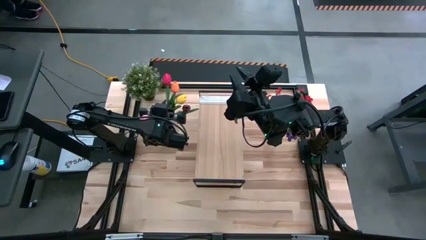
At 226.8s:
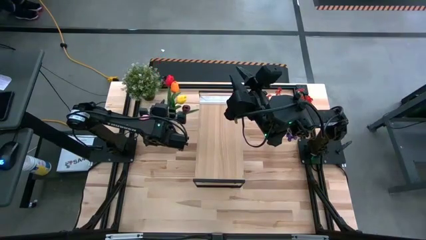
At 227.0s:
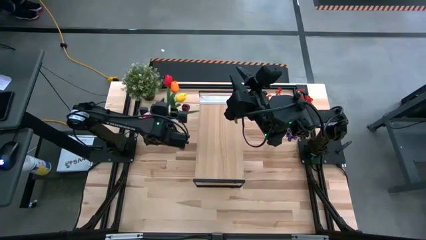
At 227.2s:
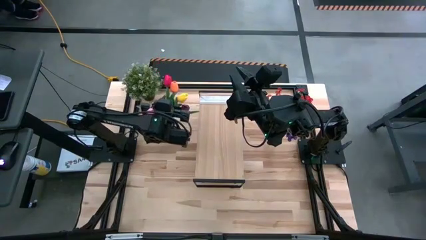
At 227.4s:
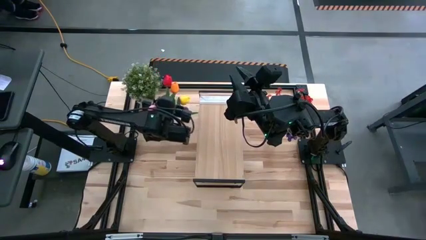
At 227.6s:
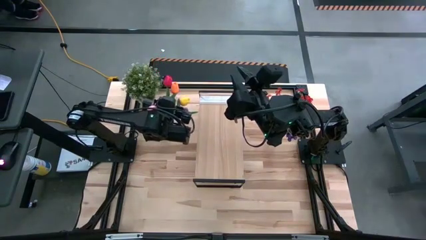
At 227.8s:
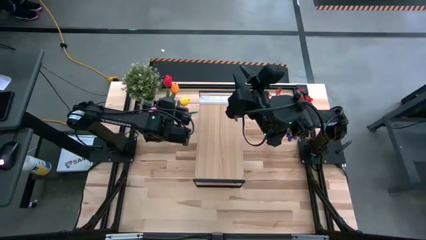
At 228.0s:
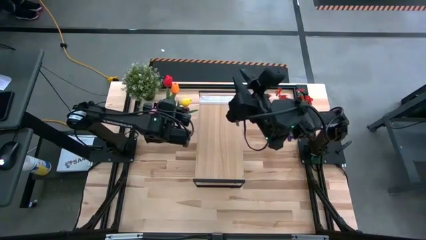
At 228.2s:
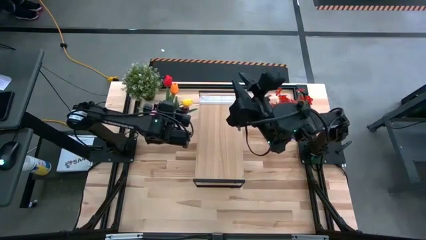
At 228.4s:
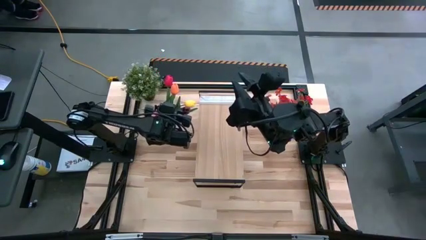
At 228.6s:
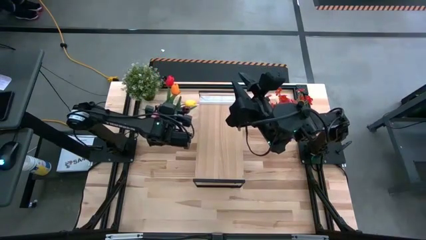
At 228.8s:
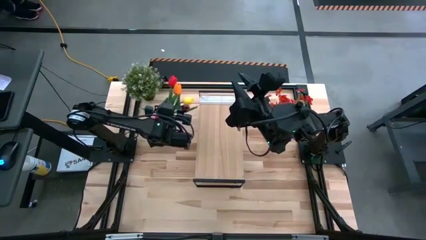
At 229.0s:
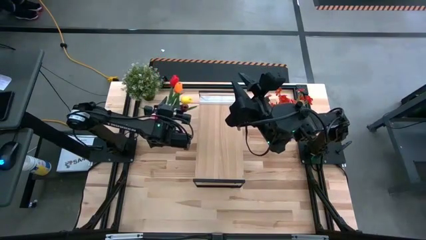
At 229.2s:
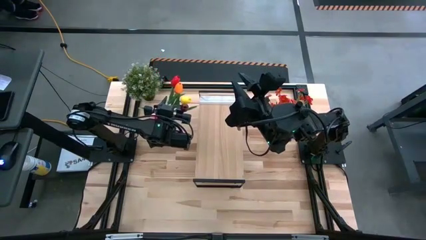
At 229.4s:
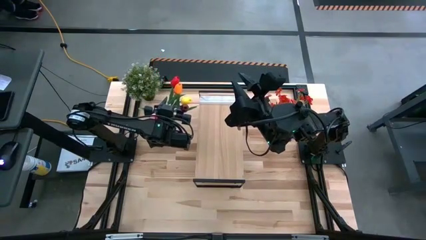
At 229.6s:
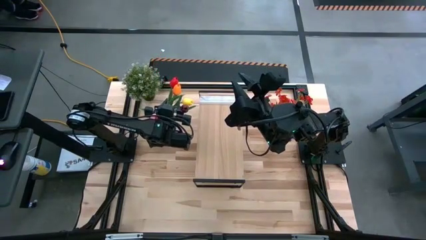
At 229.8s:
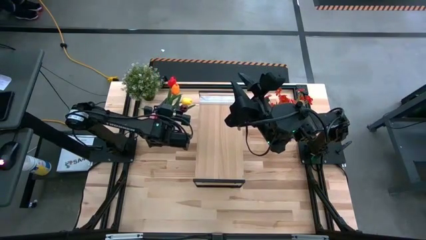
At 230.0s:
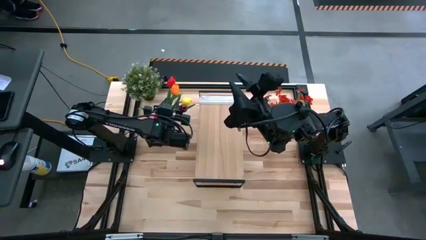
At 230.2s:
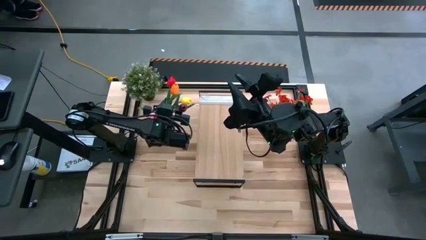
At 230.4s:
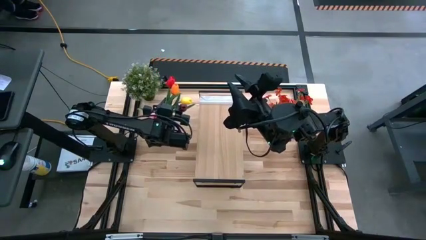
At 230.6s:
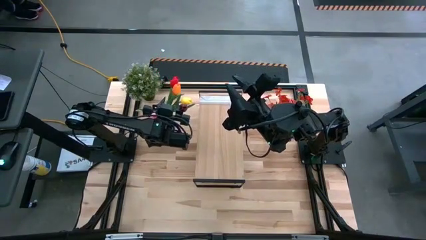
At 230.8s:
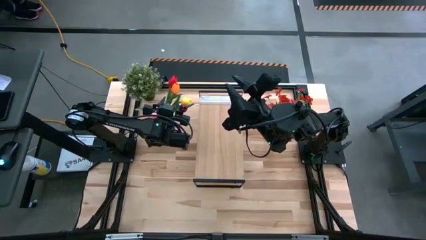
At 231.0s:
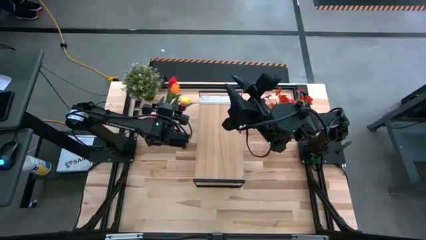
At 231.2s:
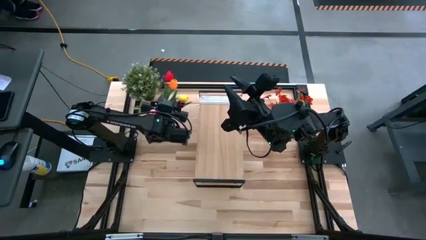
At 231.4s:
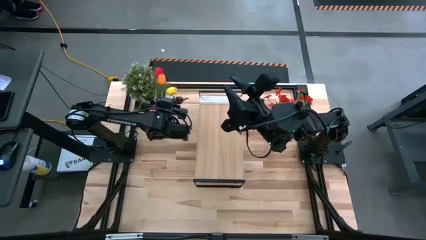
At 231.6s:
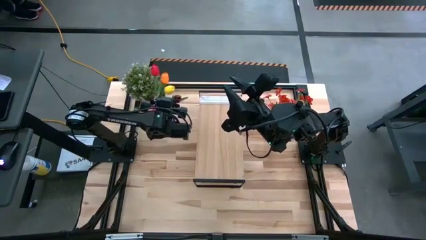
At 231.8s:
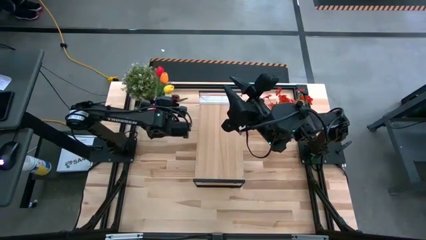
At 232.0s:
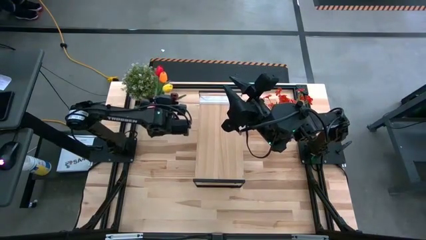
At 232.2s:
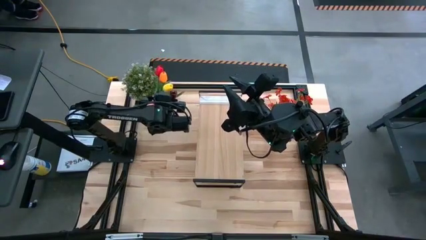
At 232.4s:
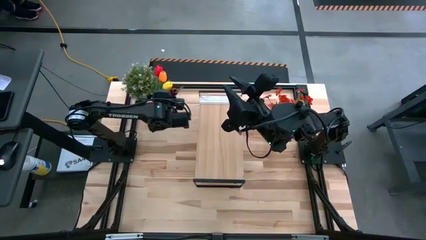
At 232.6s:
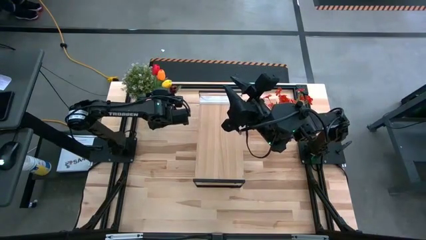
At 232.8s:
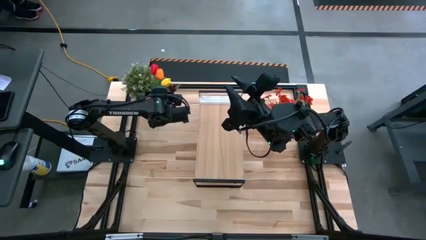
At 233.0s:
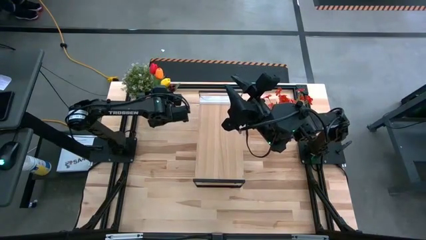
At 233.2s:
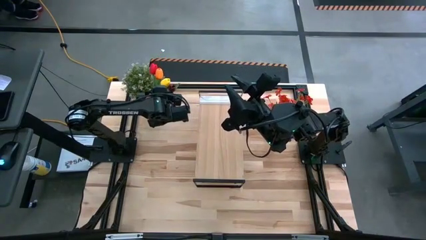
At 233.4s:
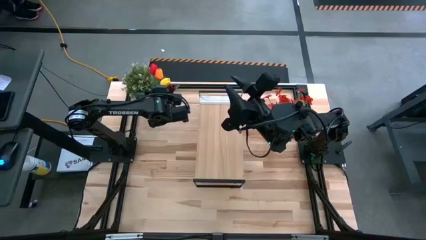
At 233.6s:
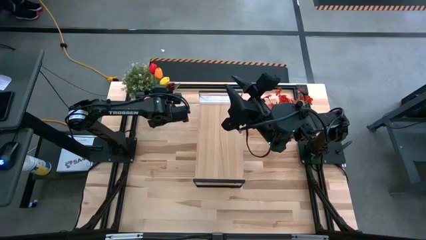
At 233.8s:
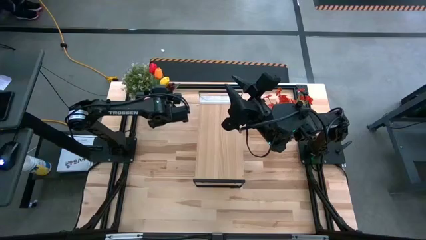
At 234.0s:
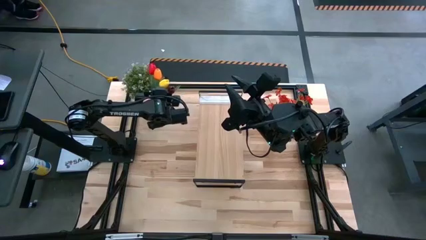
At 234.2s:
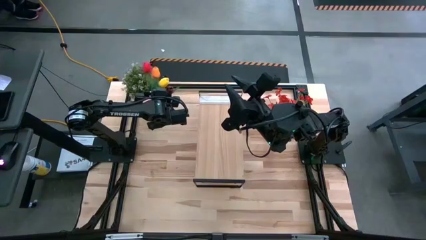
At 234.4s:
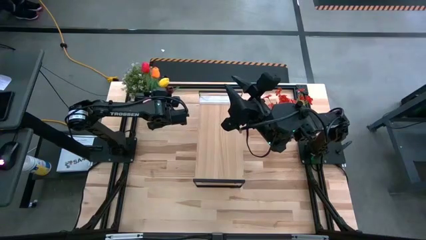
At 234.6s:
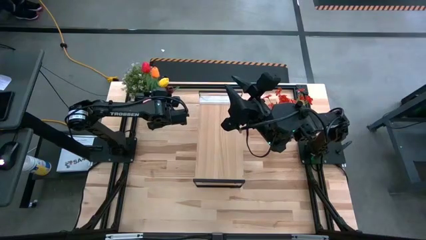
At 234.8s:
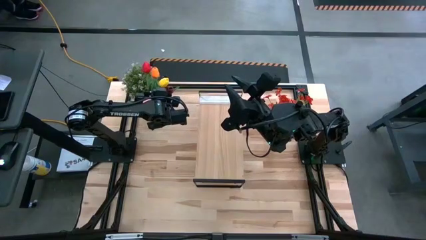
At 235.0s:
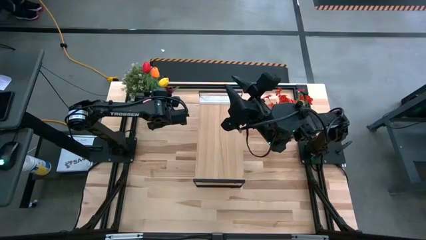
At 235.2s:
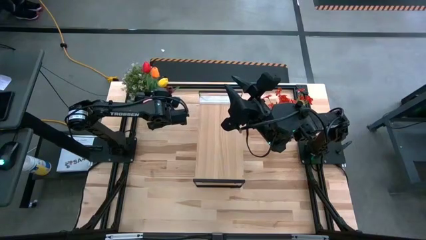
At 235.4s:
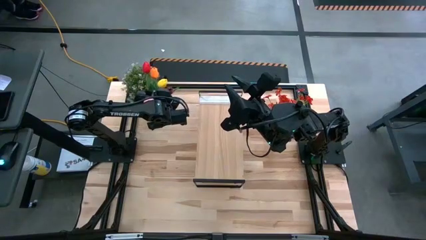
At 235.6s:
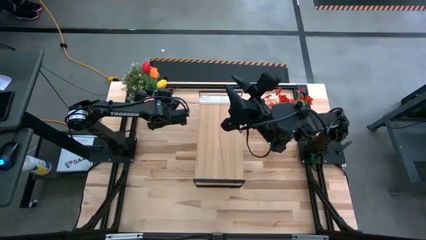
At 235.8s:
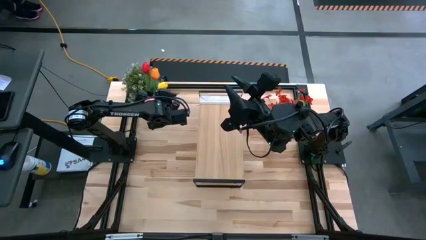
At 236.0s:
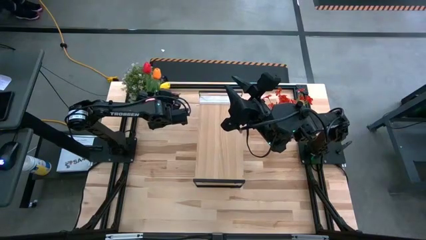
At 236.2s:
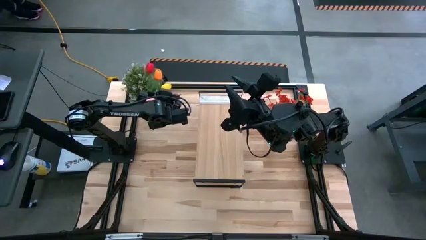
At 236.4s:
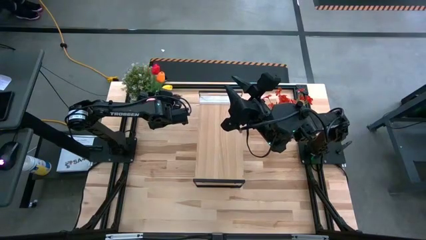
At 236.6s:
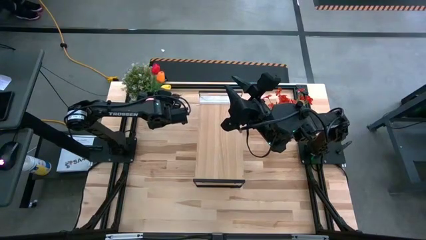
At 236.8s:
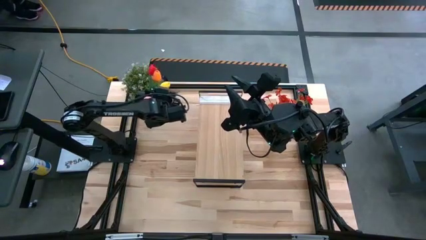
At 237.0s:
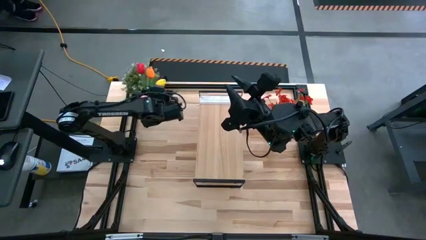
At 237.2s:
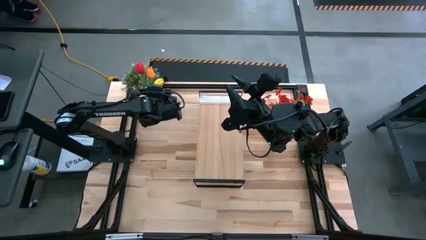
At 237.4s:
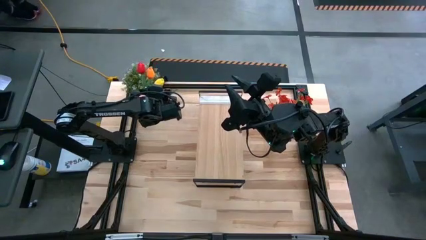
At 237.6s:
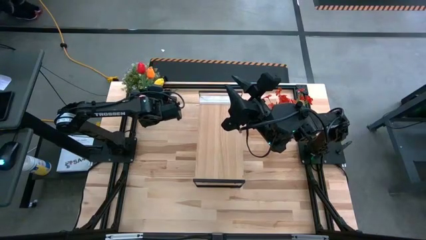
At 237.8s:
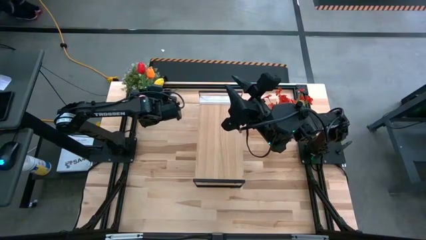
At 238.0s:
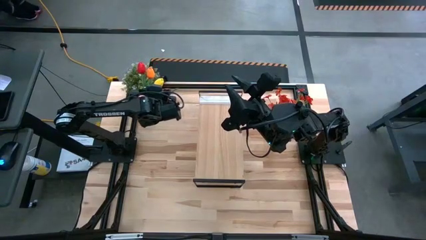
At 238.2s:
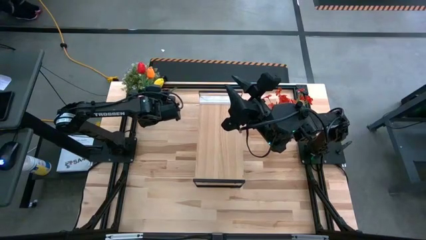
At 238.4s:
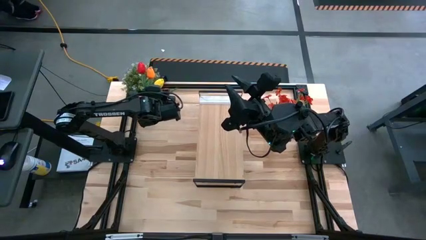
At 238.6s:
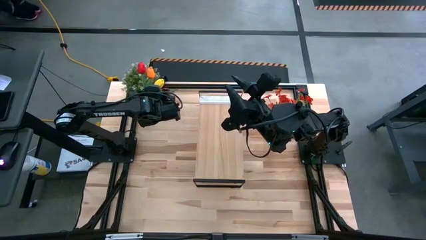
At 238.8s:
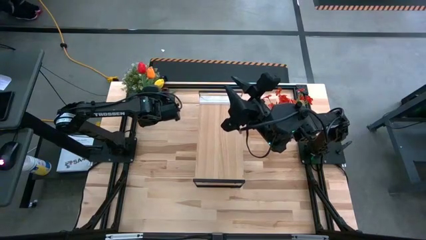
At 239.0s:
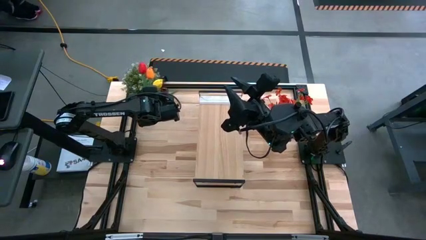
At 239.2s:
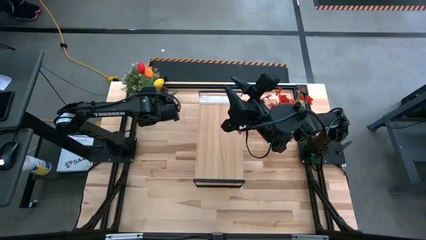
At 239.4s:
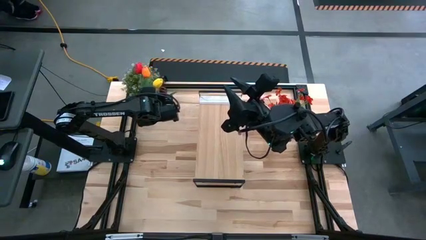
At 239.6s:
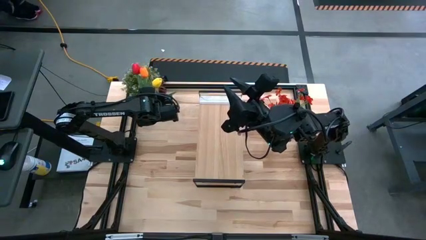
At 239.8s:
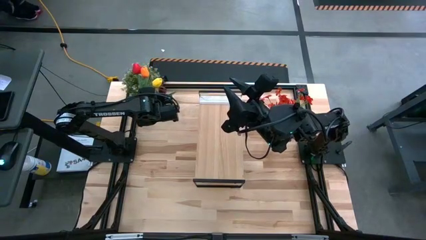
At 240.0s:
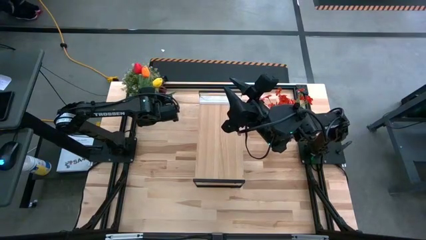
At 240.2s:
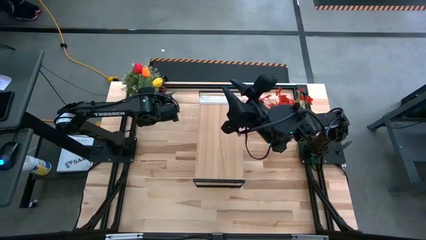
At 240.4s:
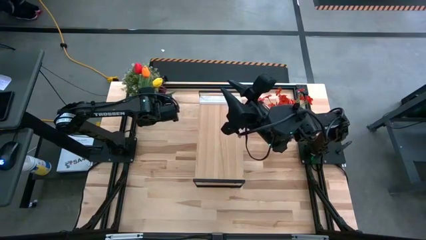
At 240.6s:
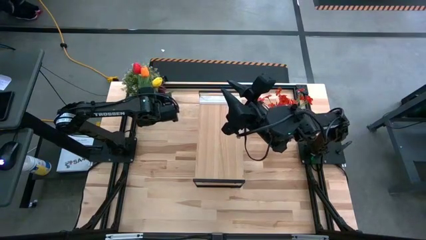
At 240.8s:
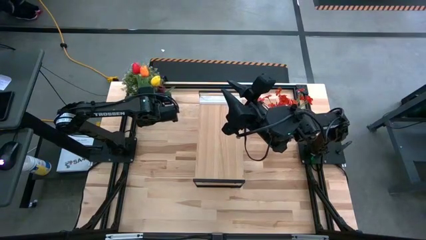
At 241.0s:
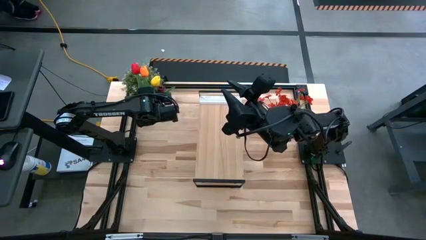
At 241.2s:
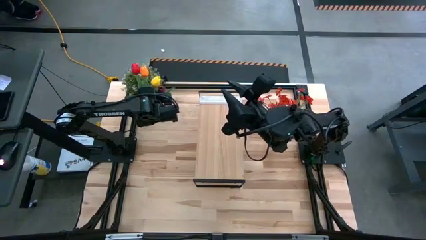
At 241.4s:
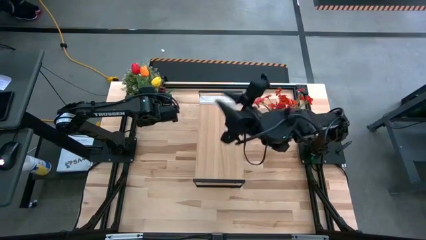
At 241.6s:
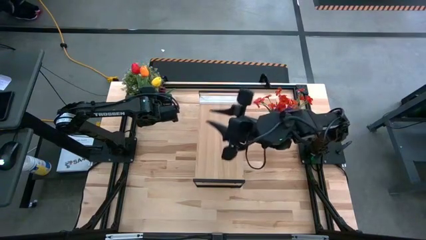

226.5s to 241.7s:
Task: Pick and place flowers into a vace then onto a shelf
Put the pink tulip into the left transparent vase

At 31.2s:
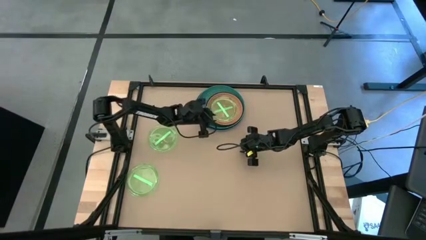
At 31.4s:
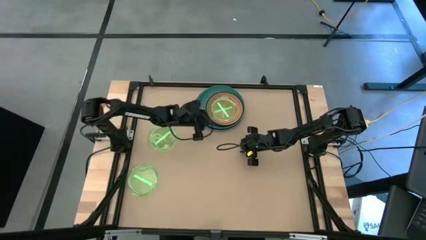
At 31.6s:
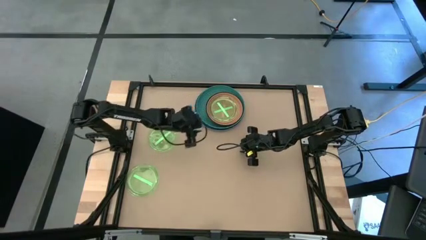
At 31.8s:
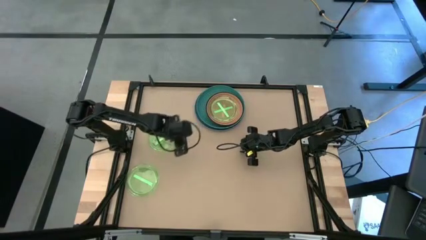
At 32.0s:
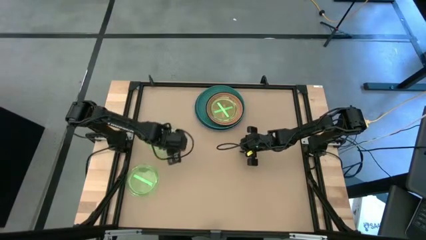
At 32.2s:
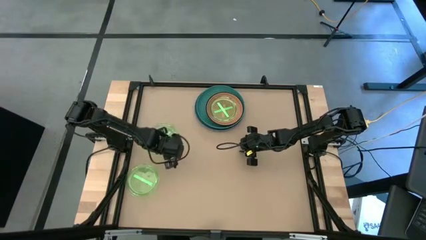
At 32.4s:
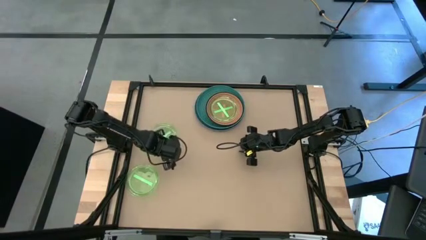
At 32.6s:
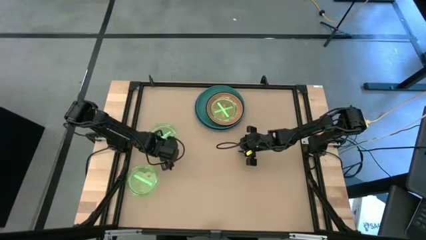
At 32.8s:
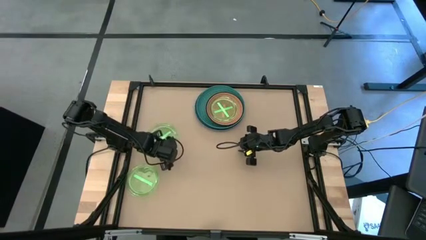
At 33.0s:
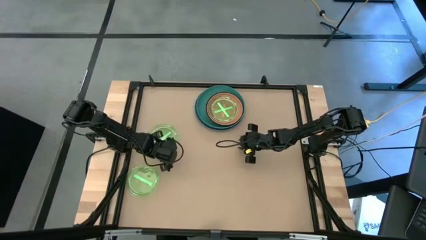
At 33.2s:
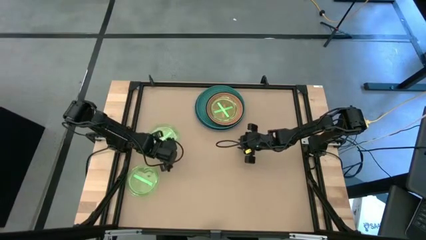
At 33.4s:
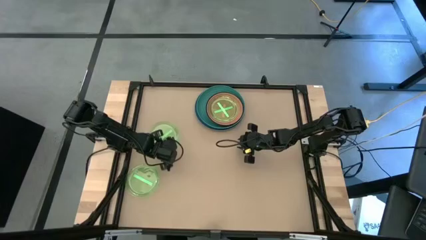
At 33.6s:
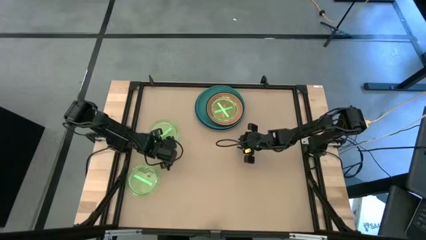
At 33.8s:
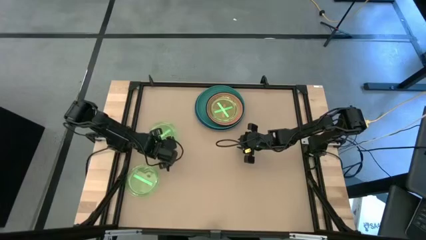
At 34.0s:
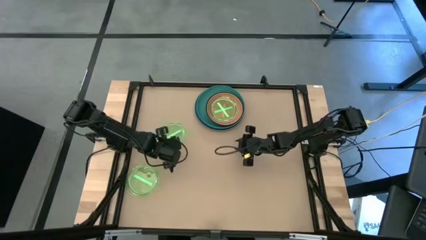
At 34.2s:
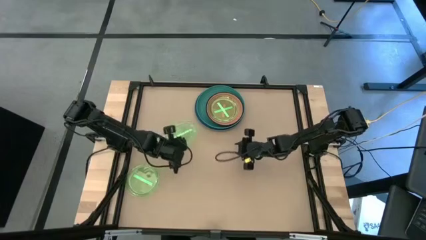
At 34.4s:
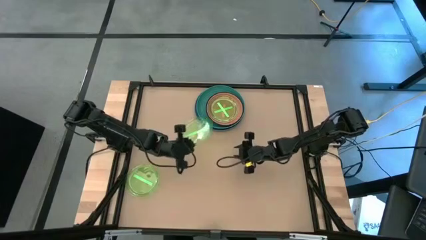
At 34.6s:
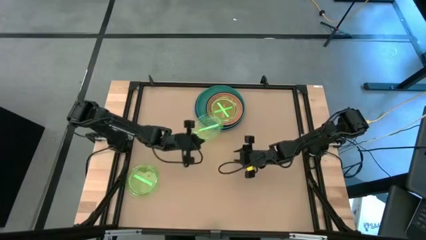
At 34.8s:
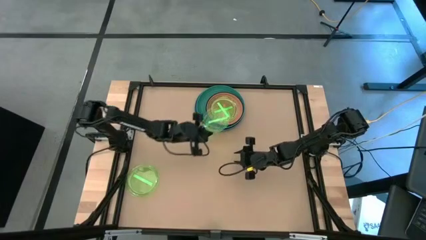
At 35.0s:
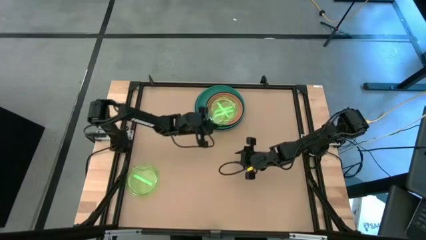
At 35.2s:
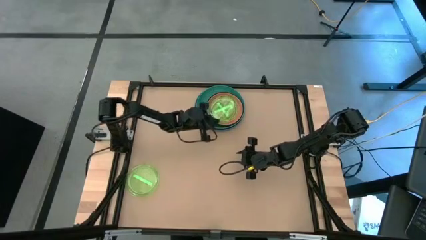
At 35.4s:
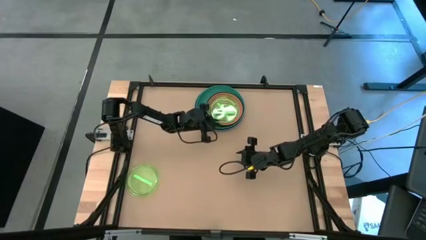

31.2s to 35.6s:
Task: Stack plastic plates
Stack the green transparent plate on top of the green transparent plate
